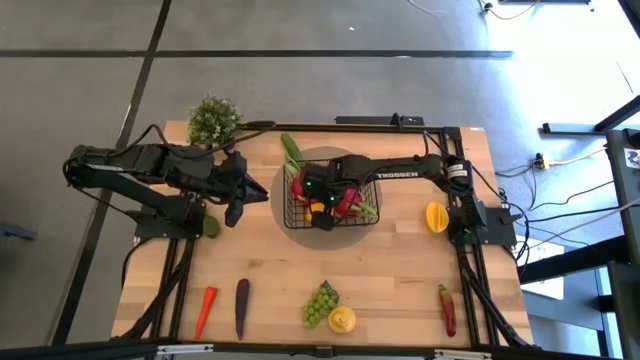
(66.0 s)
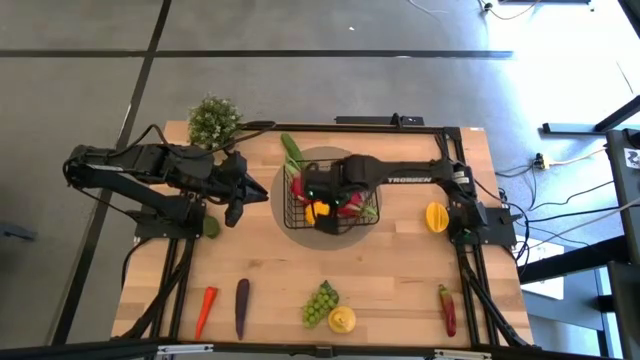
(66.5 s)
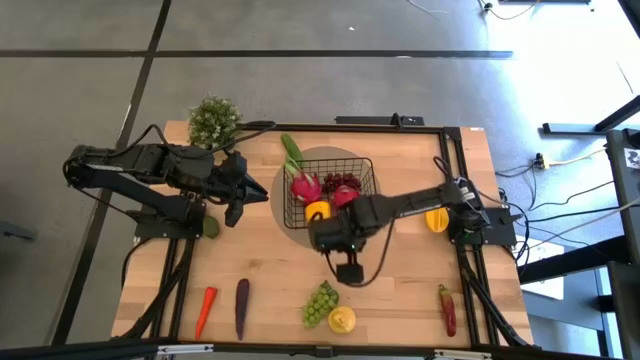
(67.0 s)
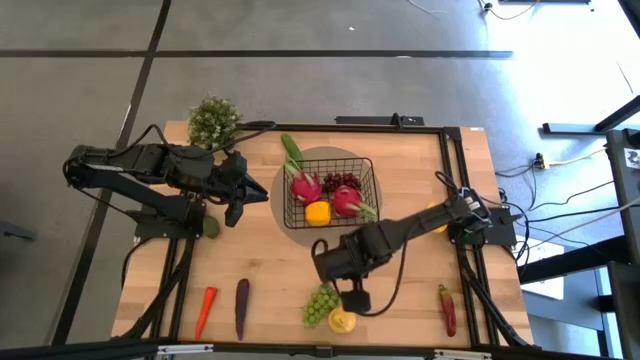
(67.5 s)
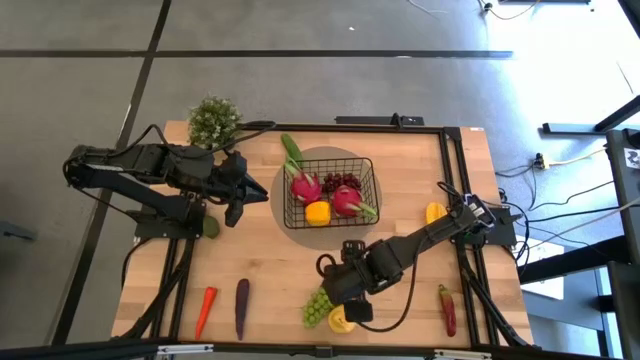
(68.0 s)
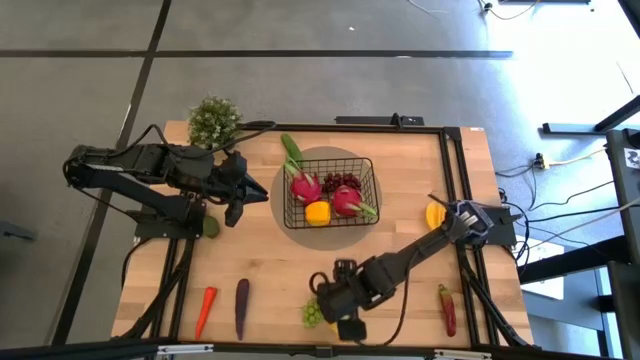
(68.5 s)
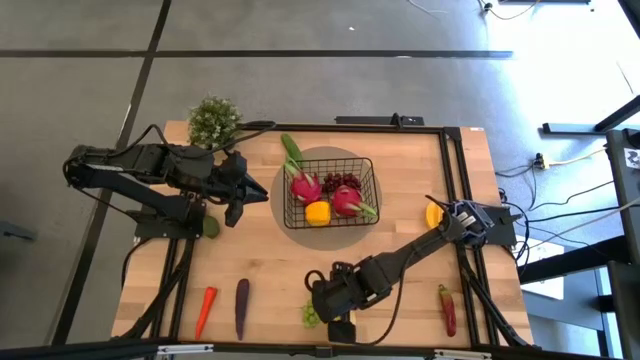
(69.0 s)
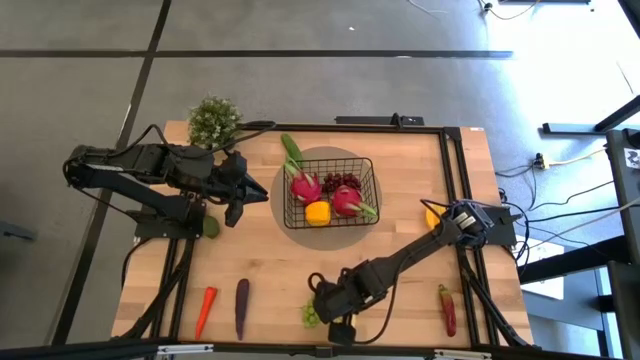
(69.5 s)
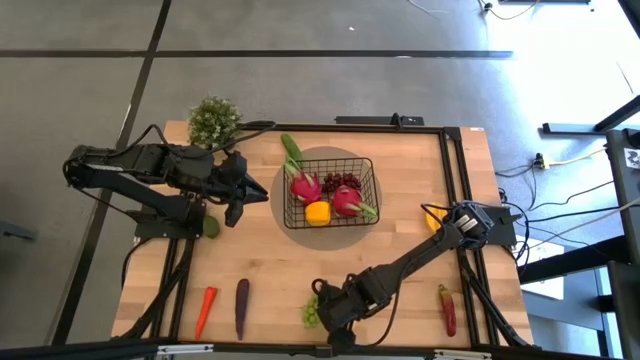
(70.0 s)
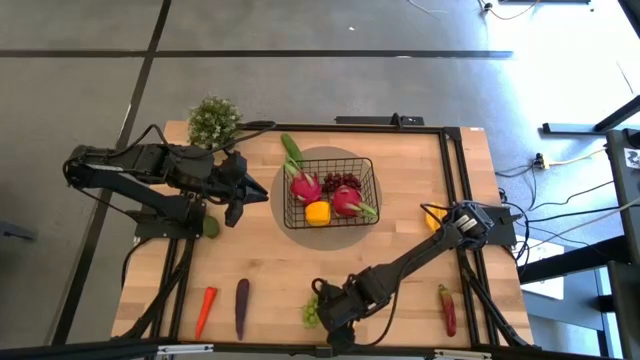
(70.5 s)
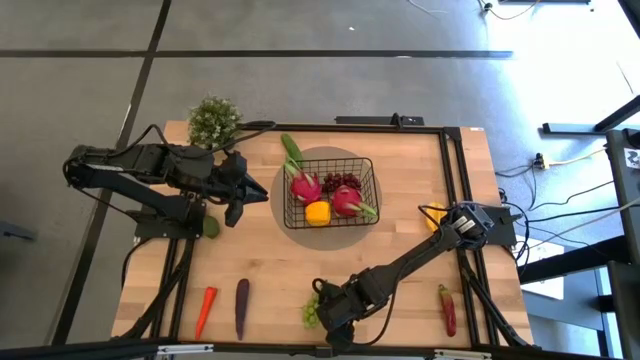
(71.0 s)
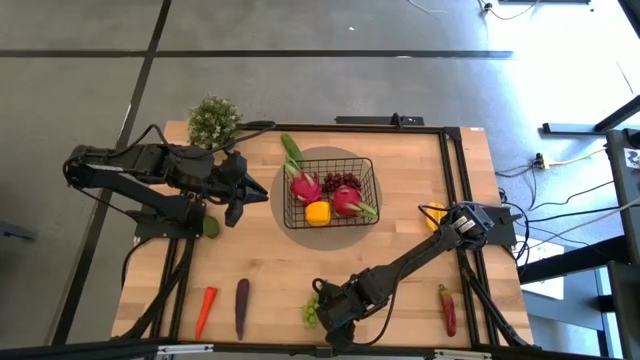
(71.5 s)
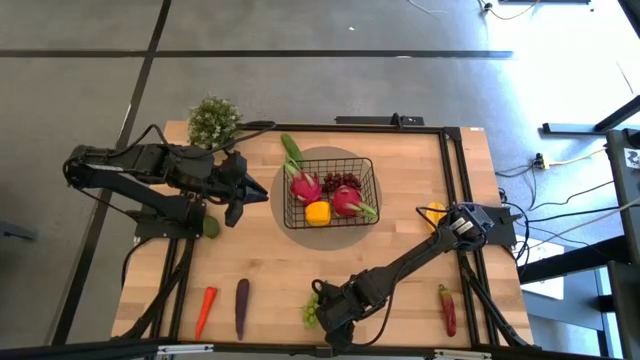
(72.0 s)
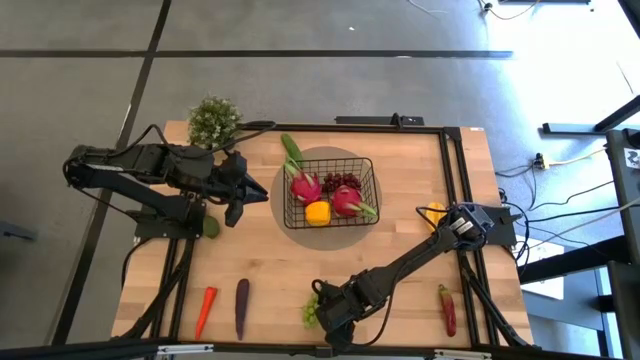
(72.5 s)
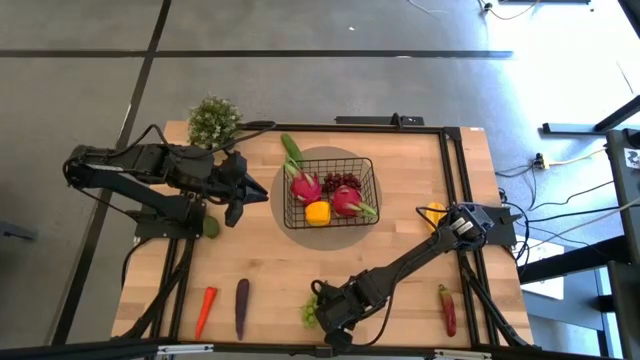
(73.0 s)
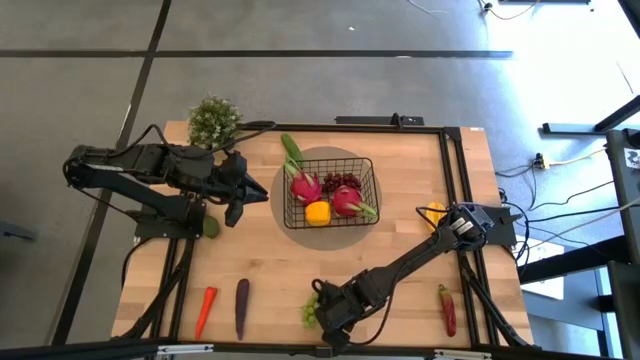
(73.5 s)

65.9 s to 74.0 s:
Task: Build produce basket
Put the yellow pear into the black wire basket

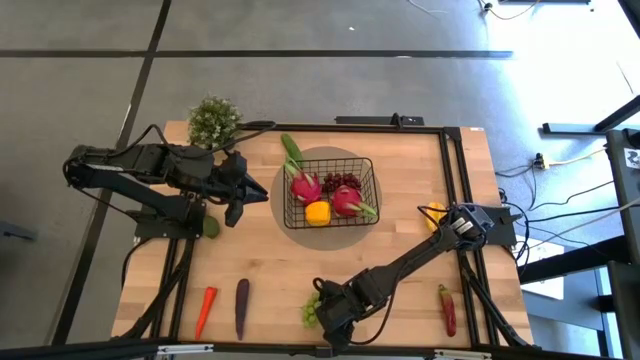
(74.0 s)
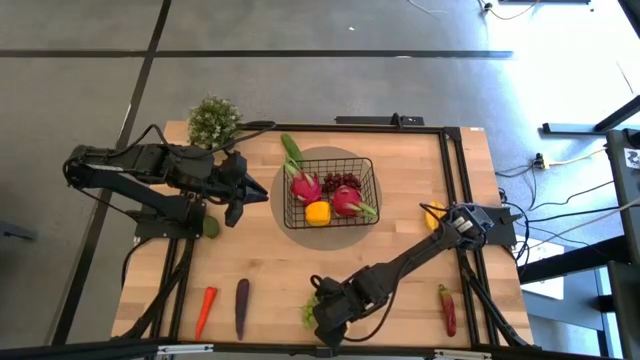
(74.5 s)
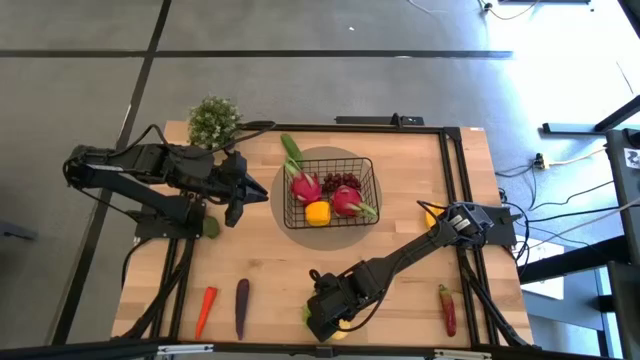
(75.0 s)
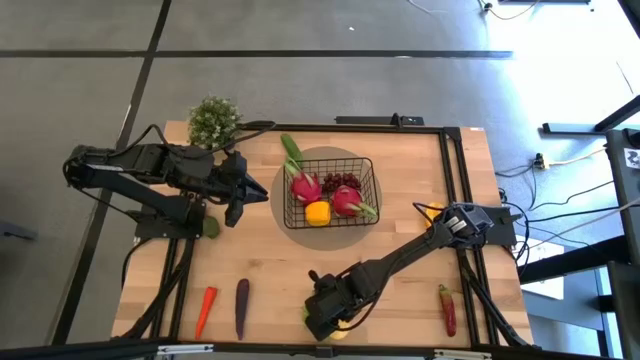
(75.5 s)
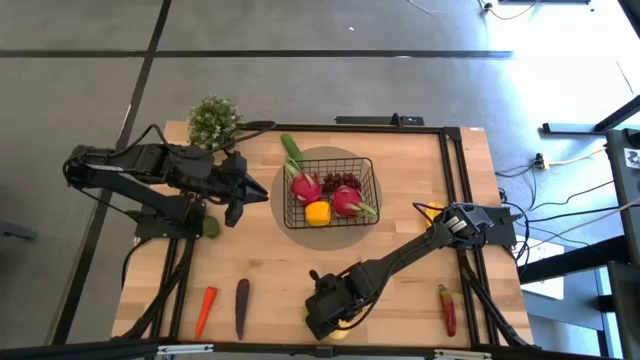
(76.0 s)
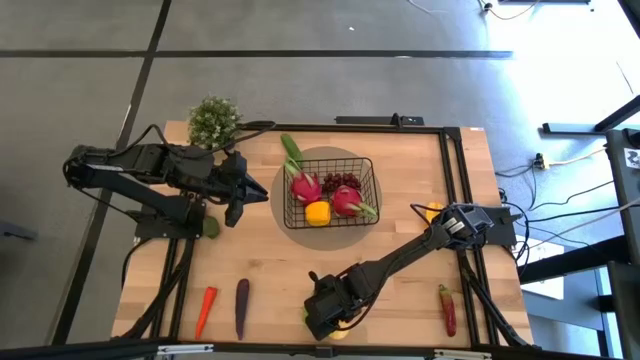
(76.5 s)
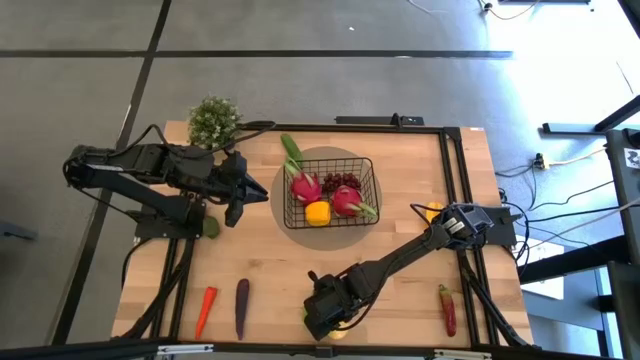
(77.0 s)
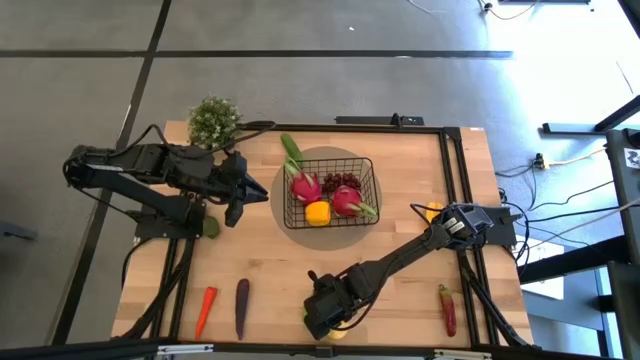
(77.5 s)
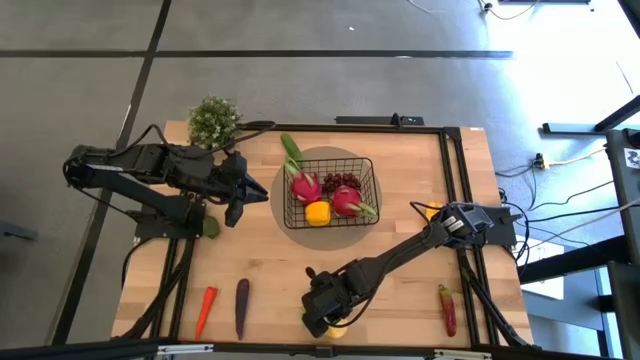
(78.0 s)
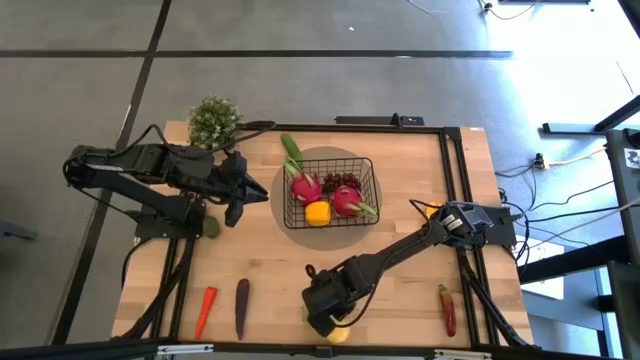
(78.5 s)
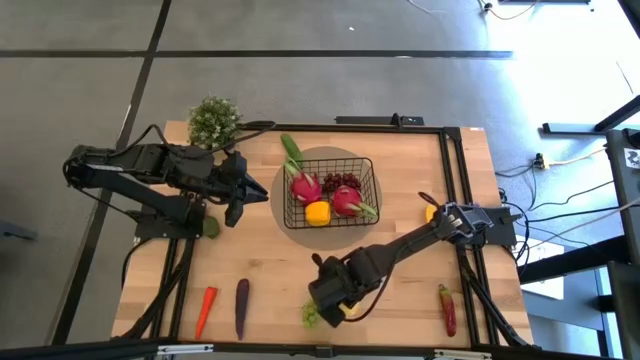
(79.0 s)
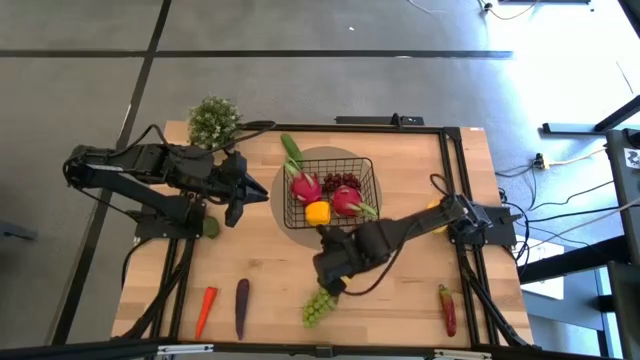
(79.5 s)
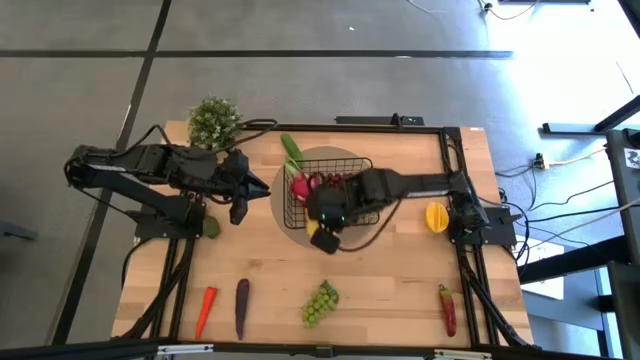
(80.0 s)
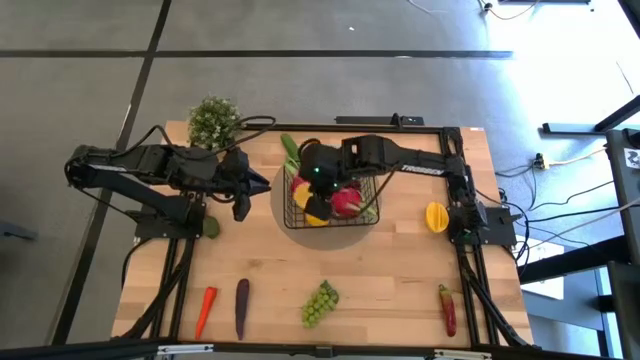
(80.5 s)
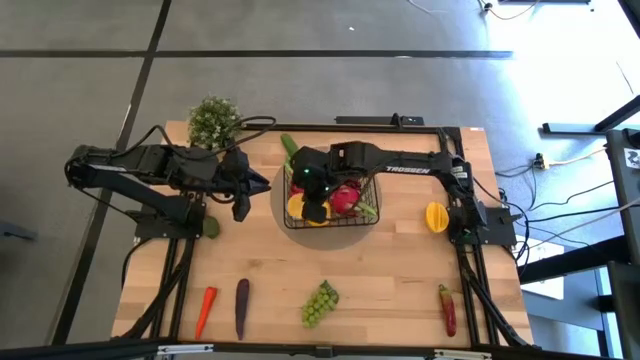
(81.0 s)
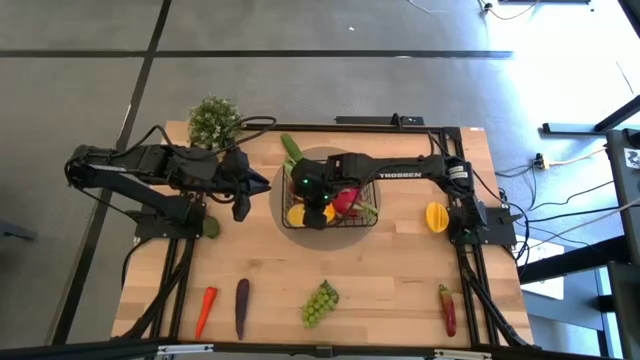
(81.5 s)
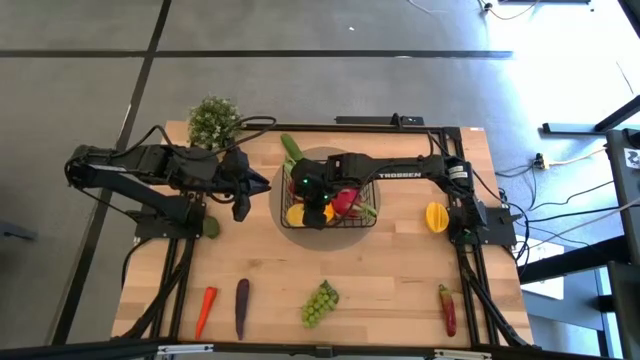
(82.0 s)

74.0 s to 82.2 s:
Put the yellow pear into the black wire basket

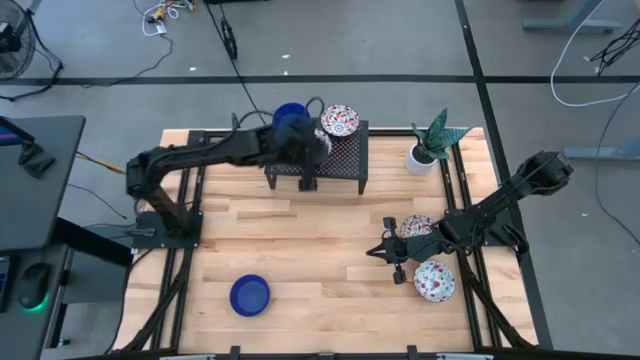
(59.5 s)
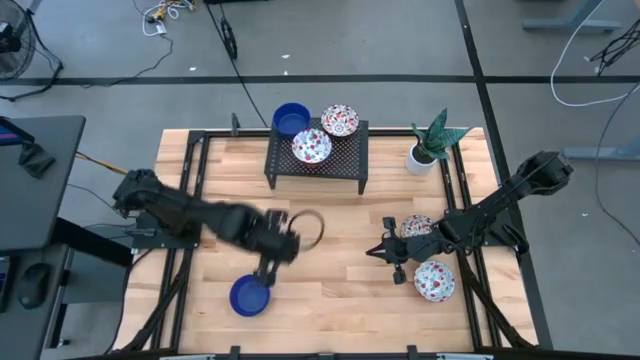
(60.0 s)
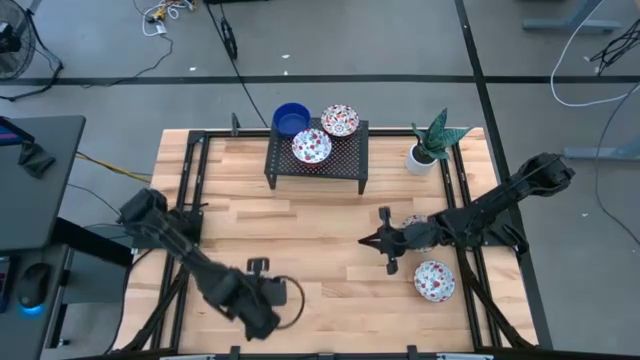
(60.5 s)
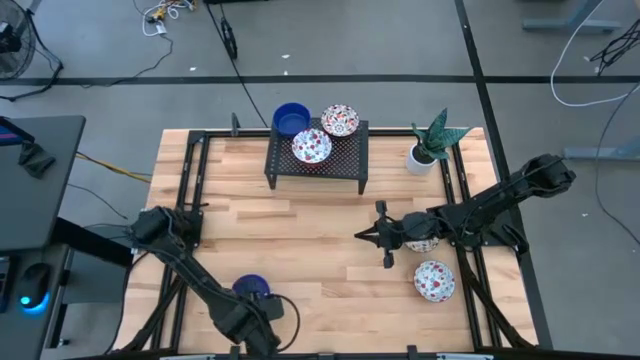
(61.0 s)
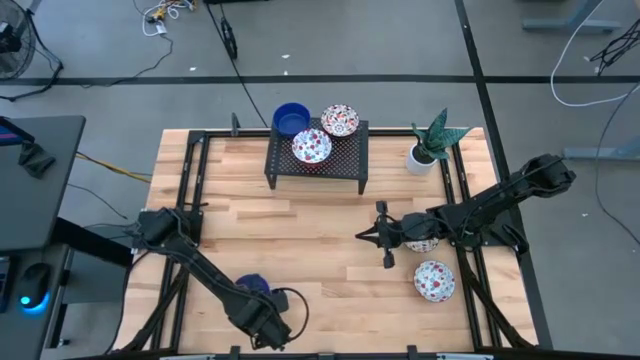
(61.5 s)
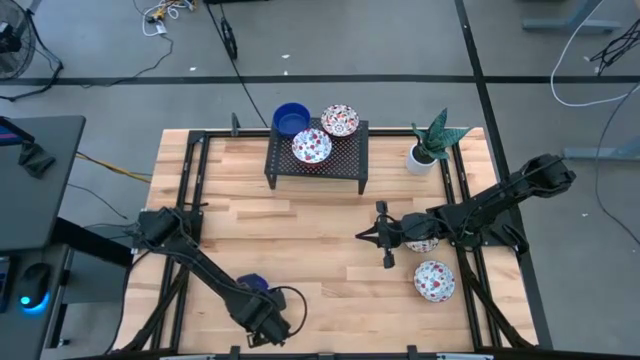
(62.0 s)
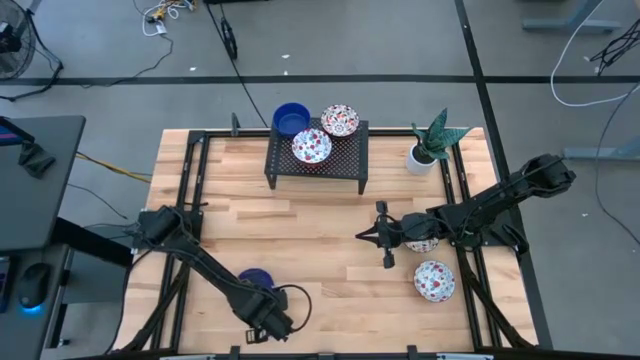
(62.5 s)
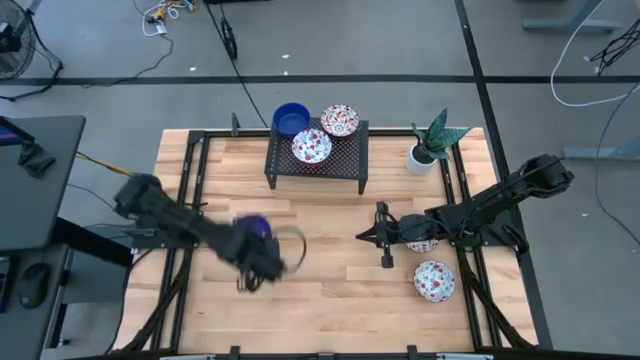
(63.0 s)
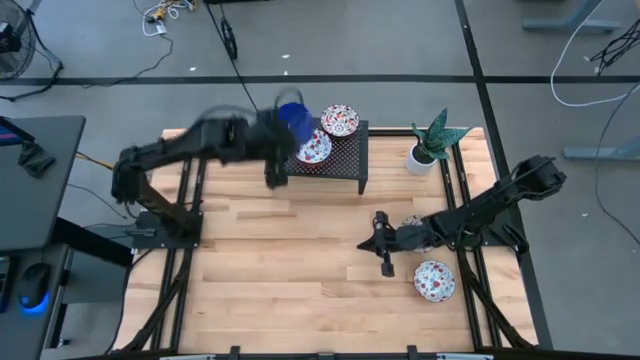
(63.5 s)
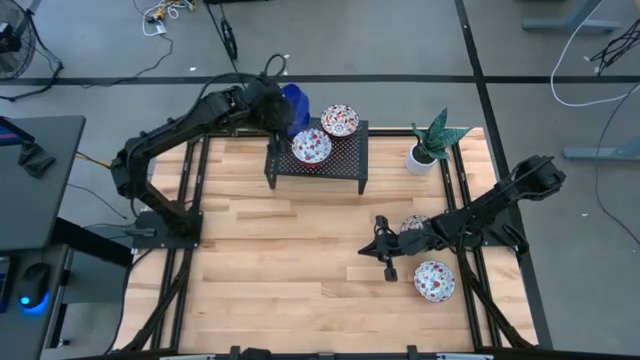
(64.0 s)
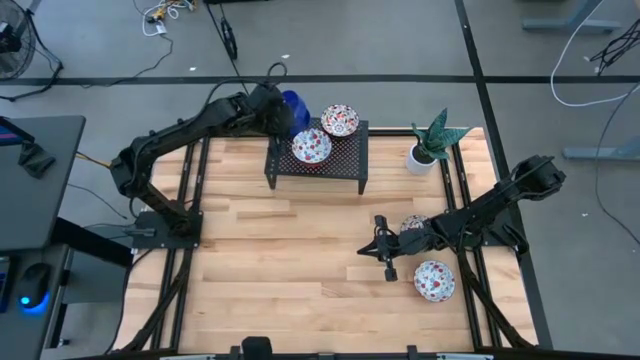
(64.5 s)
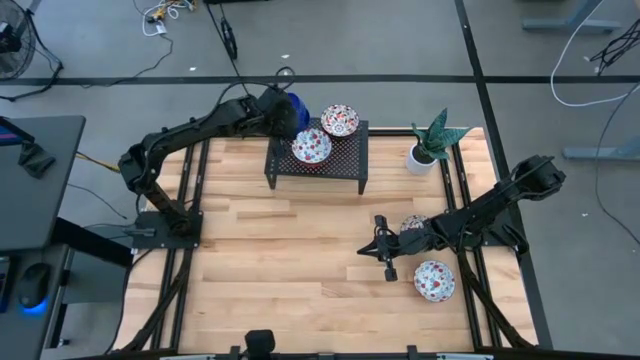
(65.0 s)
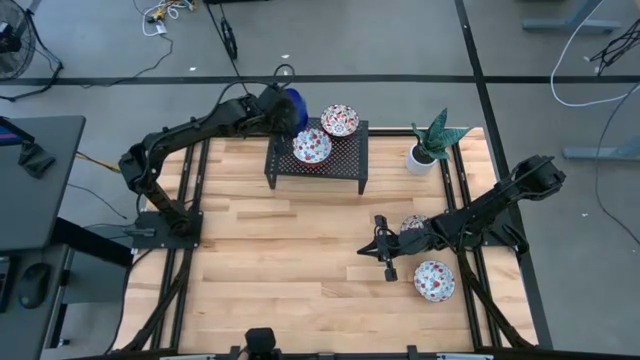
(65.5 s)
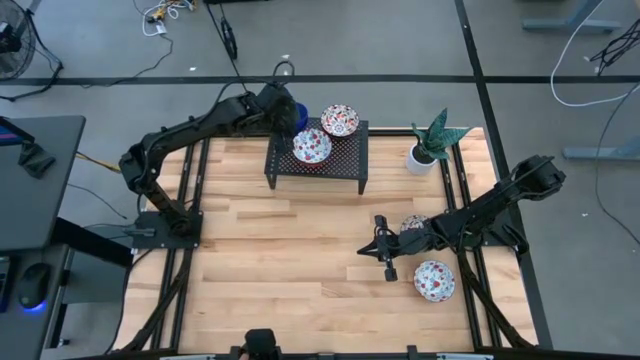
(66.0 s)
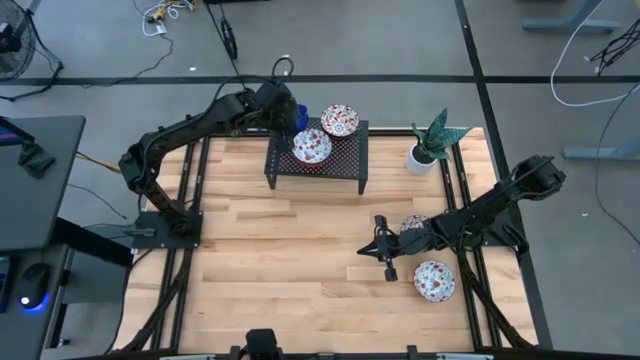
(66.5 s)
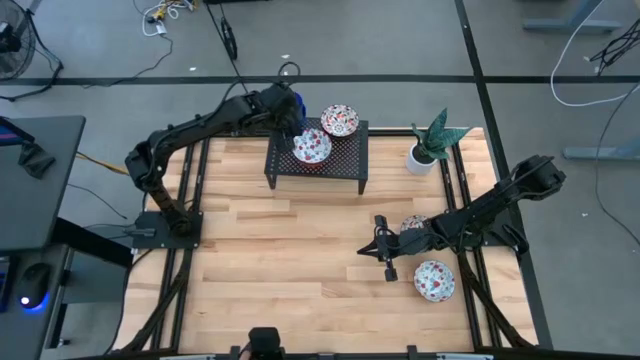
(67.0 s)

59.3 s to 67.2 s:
Task: Pick & Place Mini bowls
Stack the blue bowl on top of the other blue bowls on the shelf
